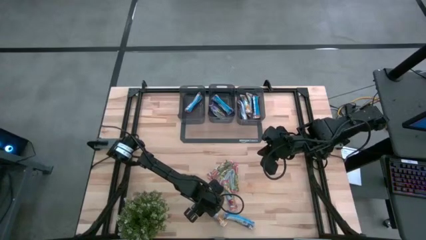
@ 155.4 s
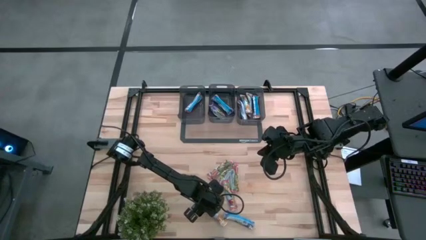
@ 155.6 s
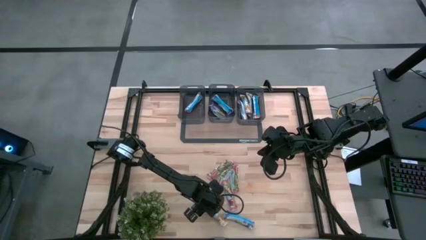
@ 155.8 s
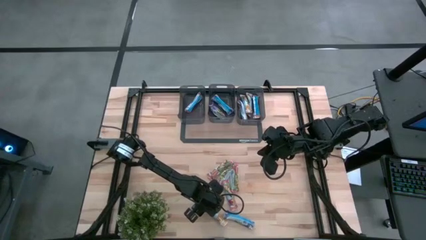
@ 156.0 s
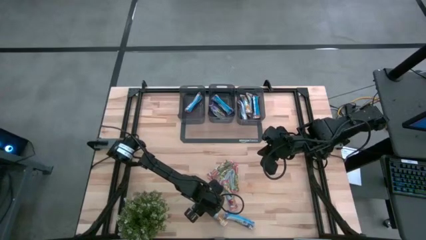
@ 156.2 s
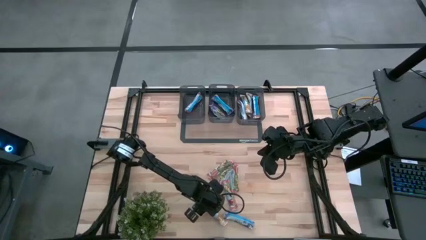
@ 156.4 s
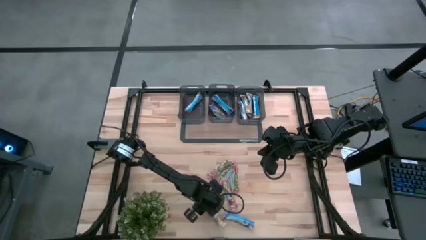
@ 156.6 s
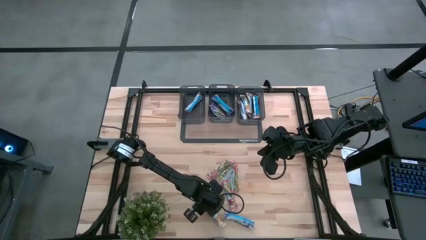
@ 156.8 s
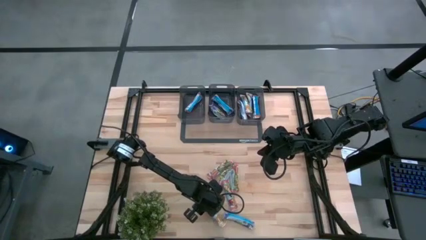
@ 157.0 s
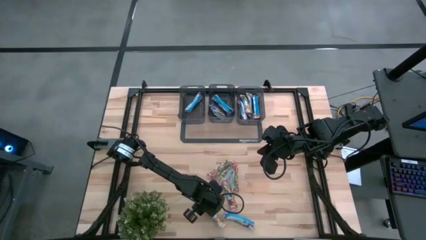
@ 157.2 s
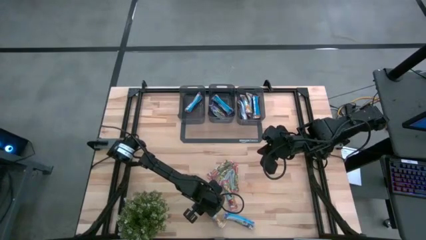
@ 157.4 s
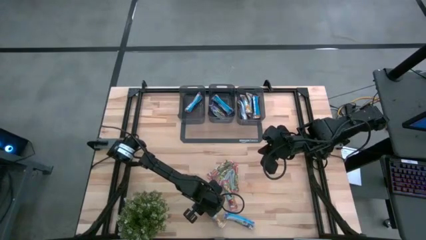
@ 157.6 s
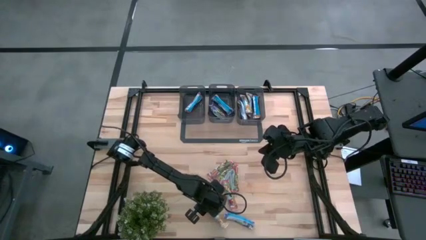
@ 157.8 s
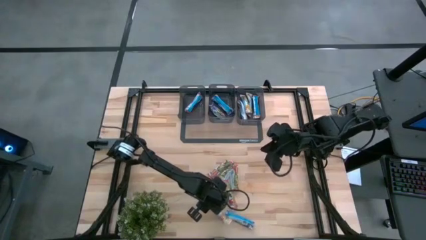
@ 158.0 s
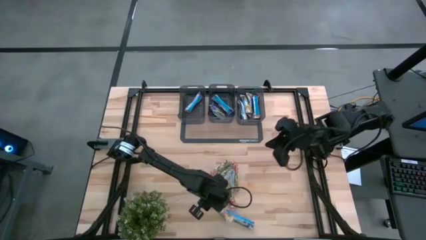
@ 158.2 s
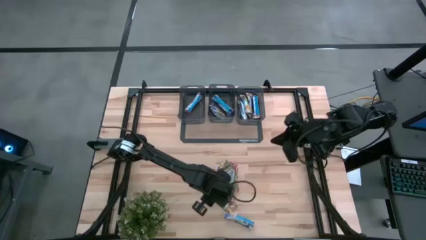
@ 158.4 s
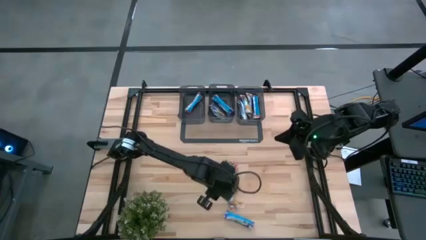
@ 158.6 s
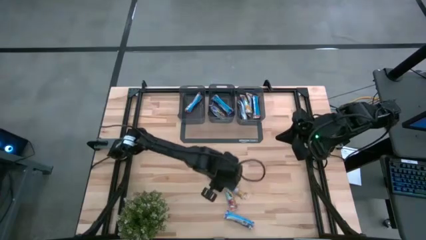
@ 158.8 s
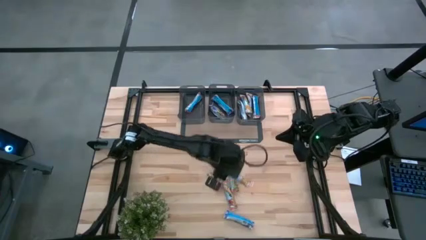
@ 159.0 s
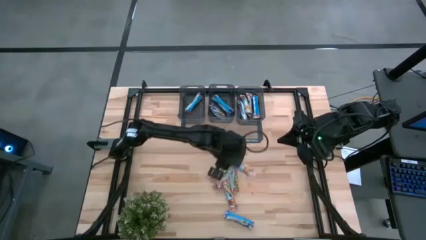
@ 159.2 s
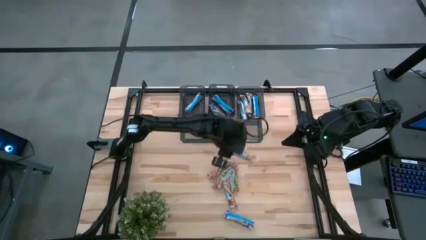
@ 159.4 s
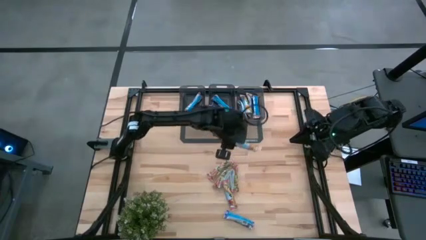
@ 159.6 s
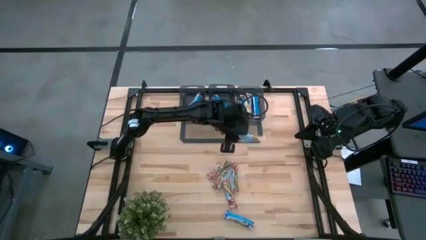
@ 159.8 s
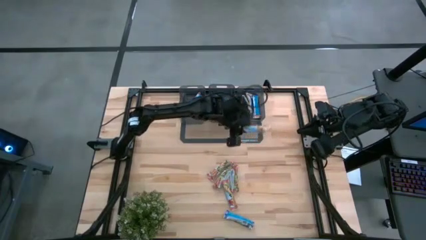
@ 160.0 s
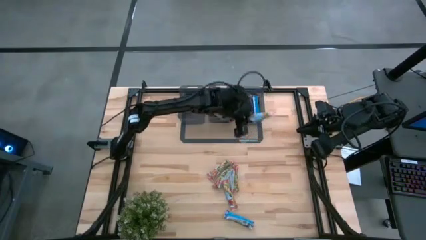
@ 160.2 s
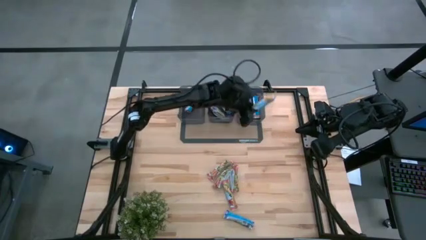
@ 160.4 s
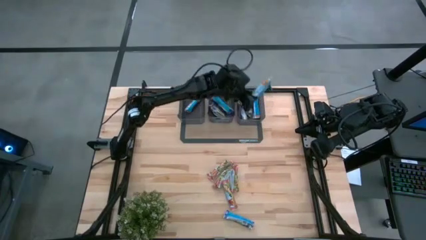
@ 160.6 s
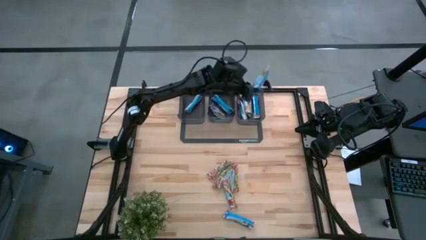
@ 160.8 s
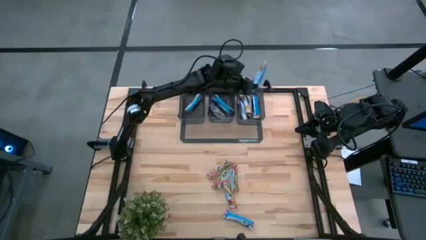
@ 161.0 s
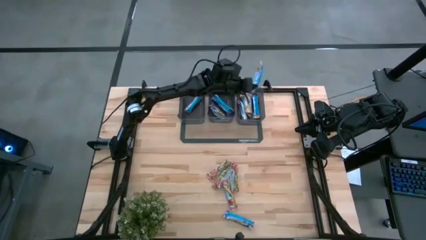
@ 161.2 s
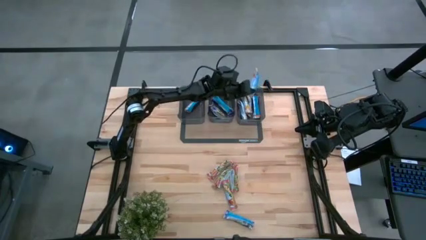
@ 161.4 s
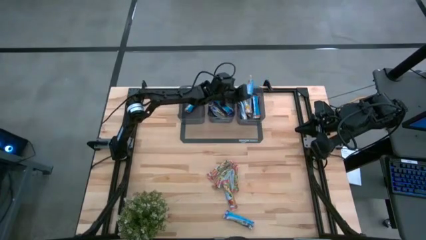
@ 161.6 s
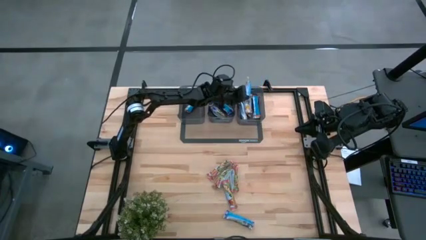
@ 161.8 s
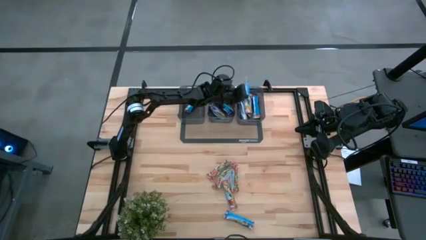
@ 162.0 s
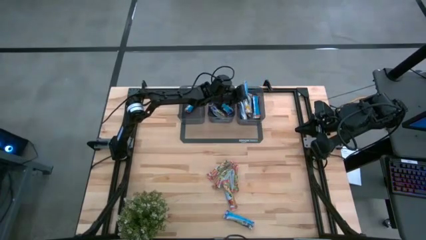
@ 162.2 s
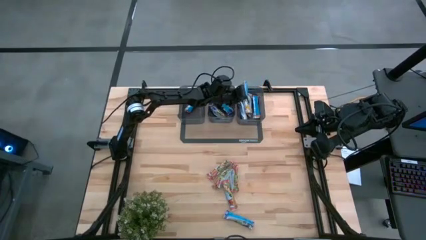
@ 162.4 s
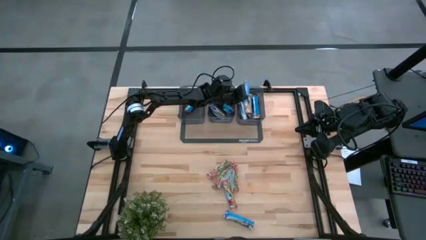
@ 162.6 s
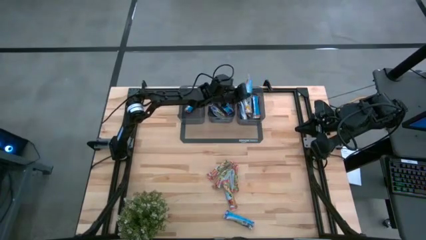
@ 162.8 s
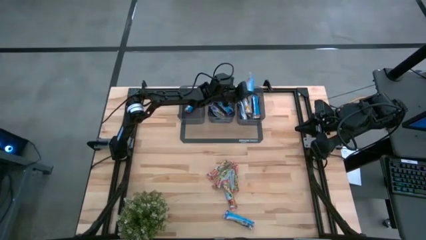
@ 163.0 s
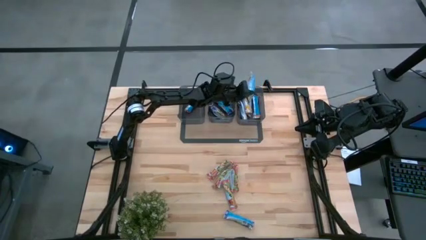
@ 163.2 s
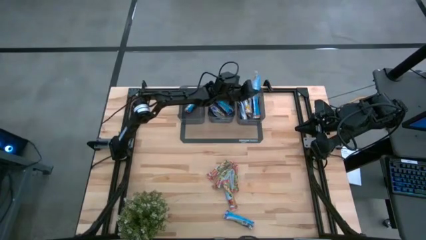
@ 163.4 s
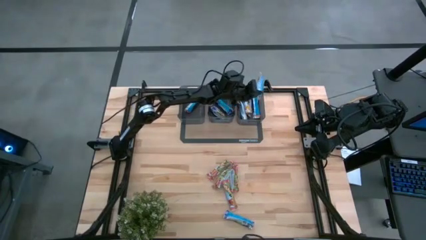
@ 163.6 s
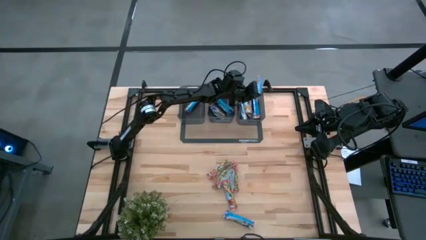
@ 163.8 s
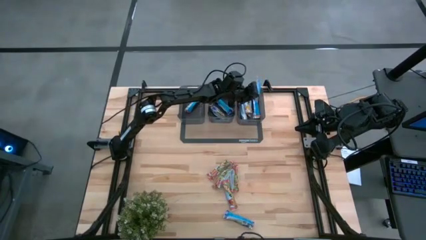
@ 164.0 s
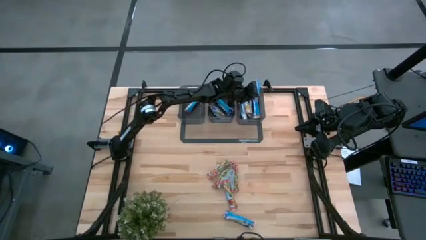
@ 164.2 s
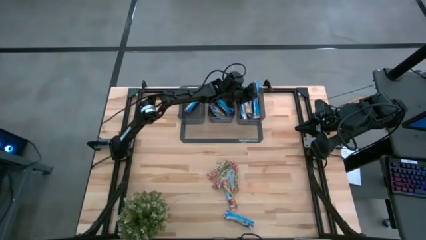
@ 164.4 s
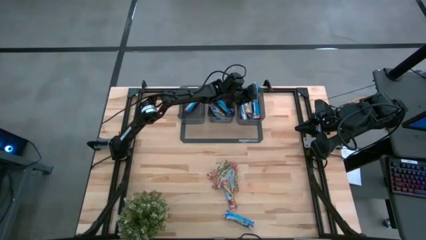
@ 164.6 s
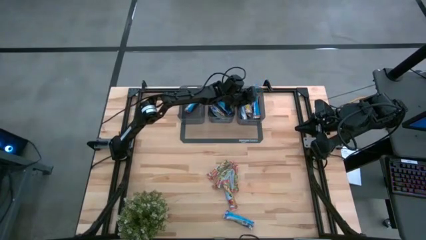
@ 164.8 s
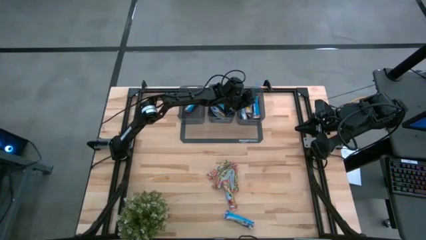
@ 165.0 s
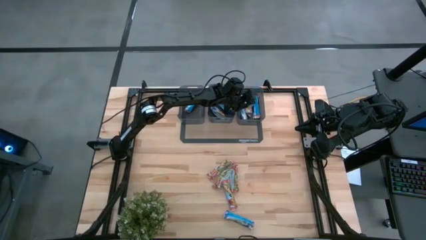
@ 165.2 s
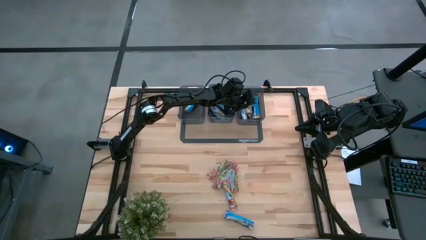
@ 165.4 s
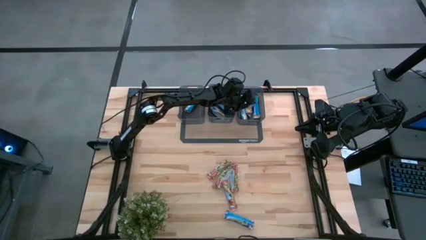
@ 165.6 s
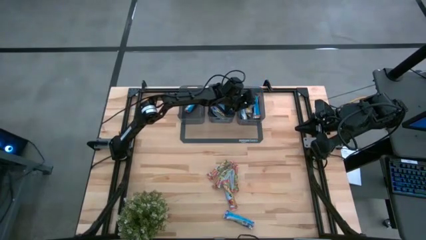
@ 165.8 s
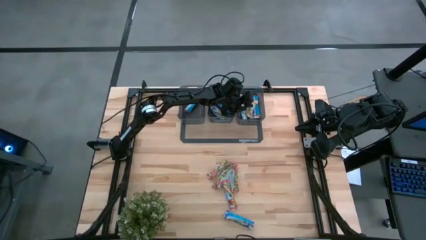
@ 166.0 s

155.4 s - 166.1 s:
Task: Pick and place Granola Bars by type
Put the yellow granola bar into the right black bin

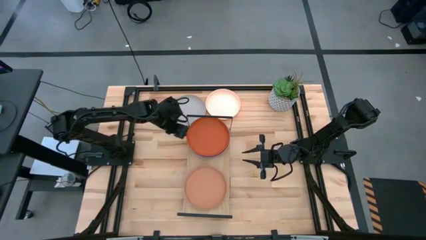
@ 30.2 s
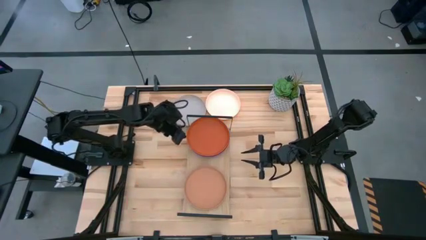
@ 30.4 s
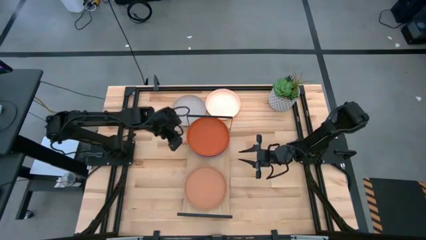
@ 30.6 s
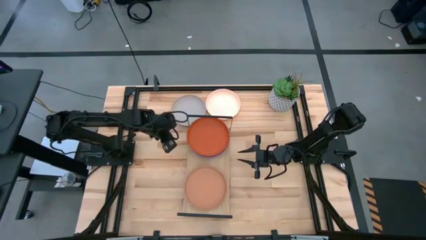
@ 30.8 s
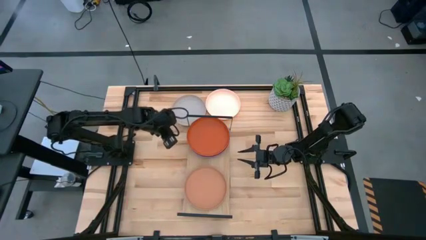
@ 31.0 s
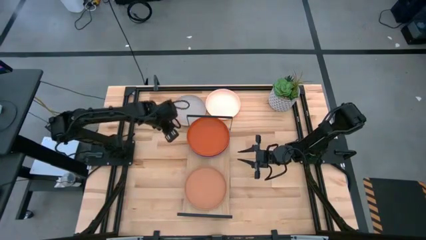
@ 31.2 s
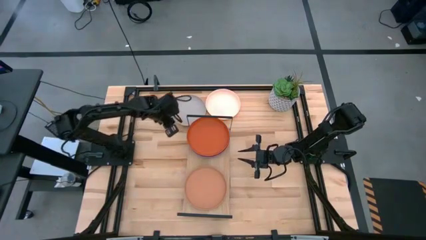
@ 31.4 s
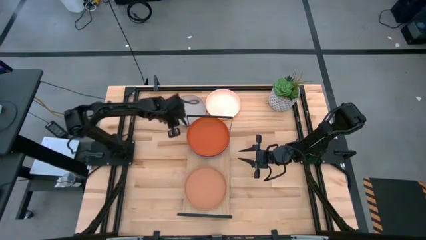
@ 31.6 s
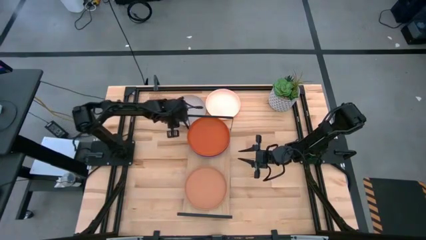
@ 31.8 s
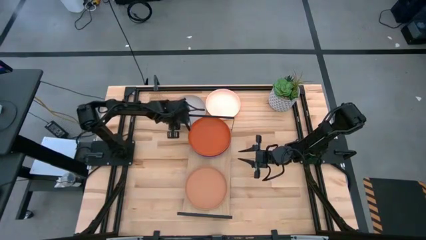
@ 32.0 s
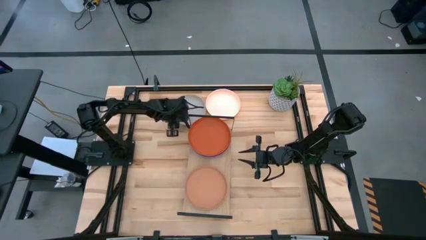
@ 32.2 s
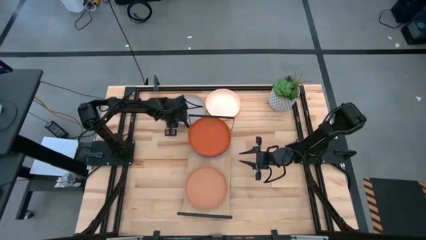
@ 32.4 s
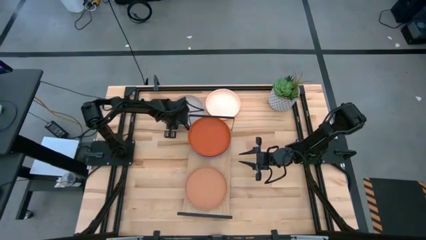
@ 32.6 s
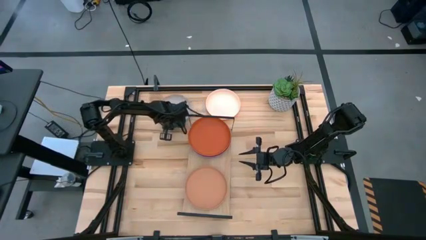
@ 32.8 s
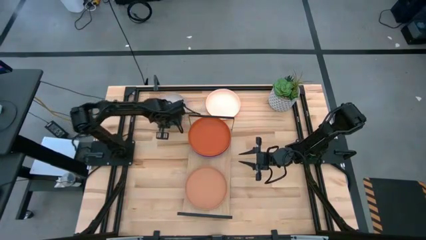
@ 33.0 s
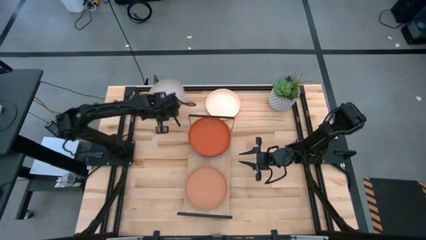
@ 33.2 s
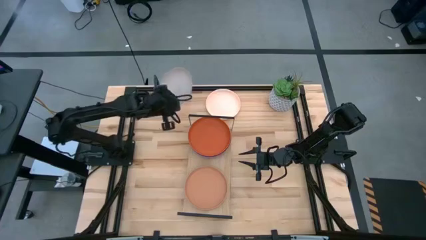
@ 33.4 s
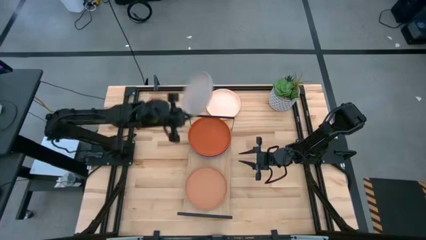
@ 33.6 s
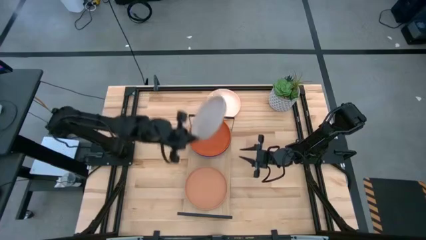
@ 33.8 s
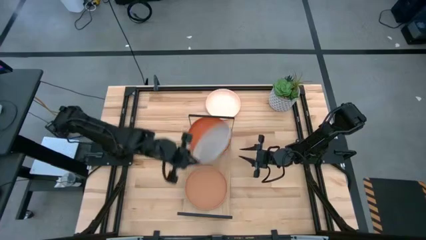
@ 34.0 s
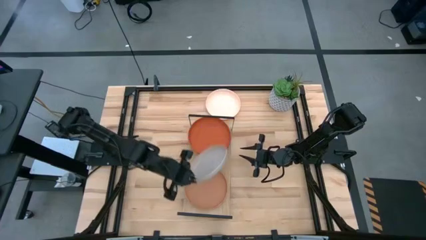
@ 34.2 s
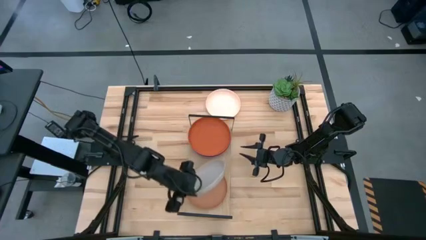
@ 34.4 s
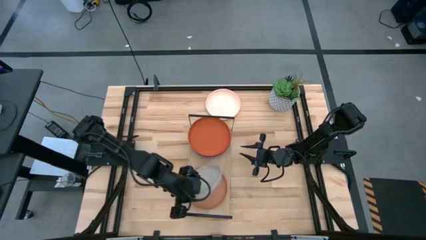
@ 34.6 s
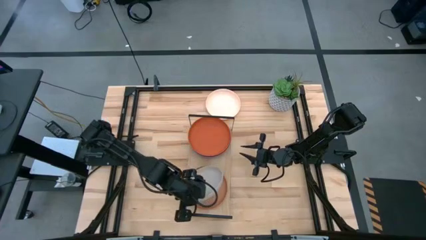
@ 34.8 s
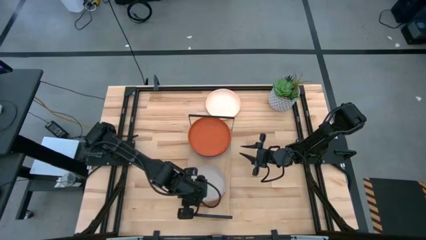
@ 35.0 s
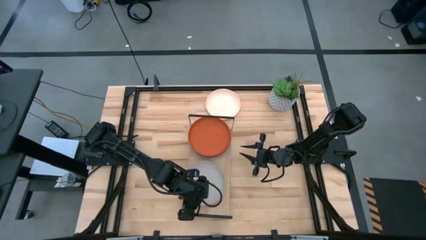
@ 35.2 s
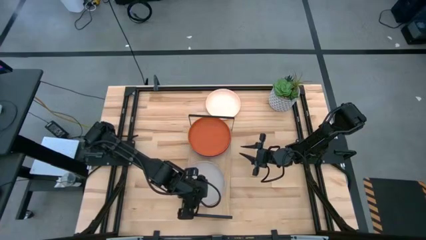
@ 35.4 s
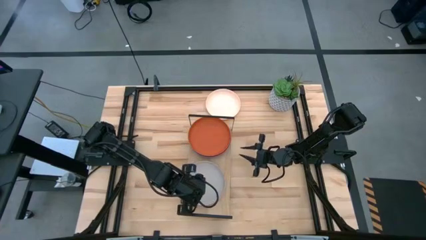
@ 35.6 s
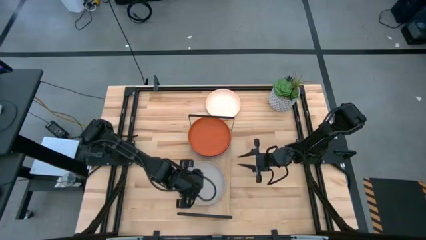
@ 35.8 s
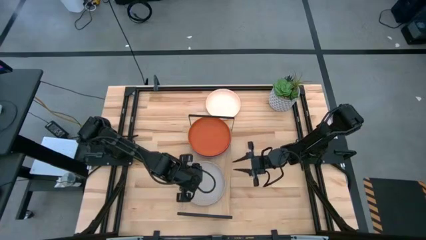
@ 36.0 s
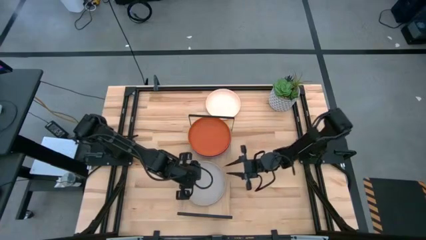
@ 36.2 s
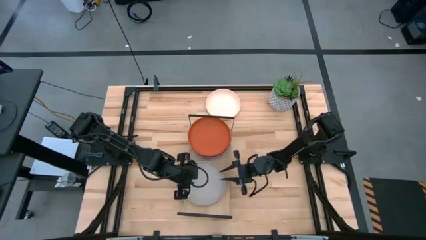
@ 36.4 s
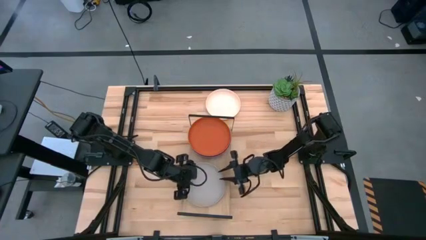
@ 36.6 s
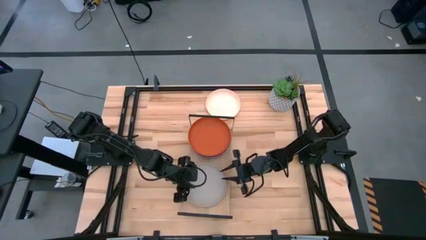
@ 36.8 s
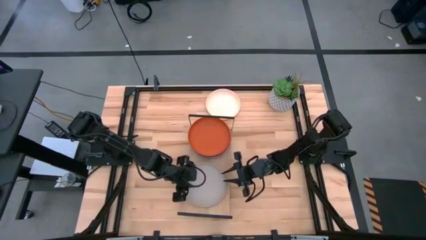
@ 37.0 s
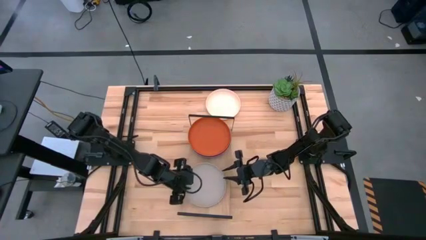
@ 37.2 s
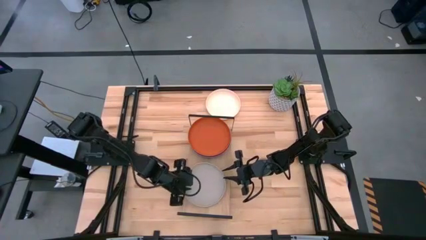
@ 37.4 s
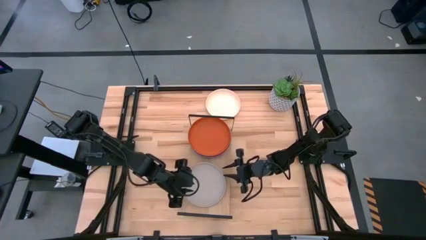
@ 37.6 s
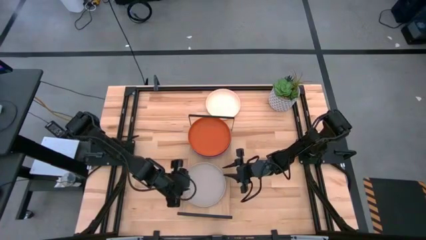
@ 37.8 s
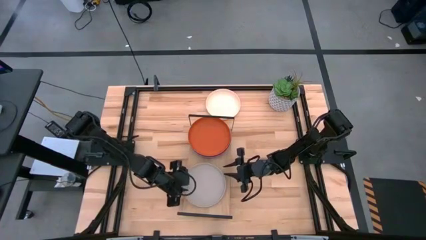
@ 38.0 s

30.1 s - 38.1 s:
Task: Place and stack plates onto a shelf
Stack the gray plate on top of the brown plate on the shelf
